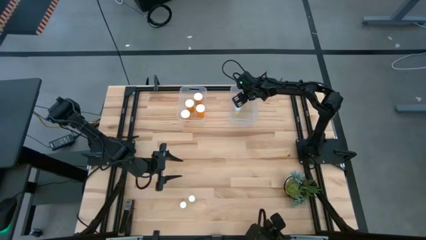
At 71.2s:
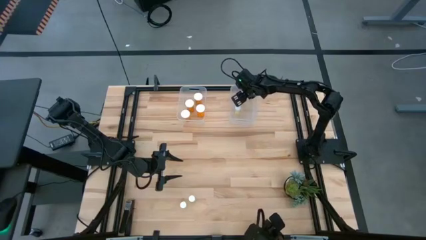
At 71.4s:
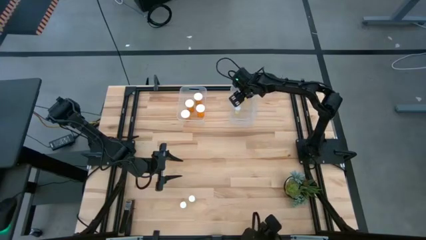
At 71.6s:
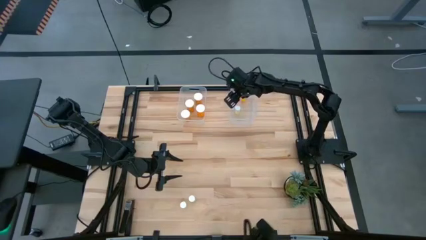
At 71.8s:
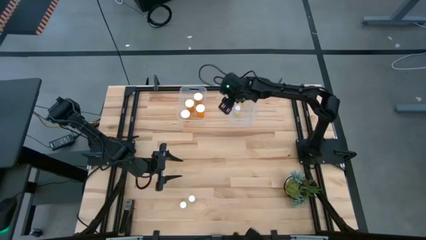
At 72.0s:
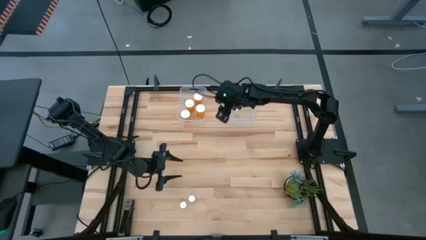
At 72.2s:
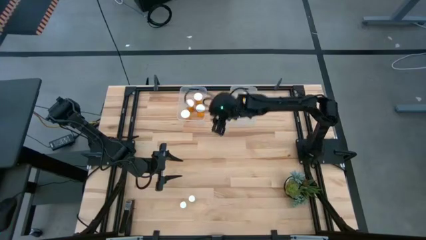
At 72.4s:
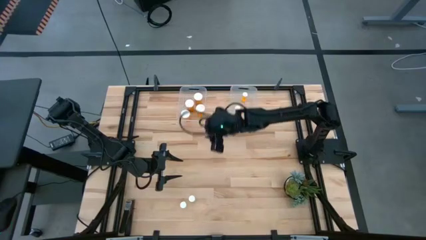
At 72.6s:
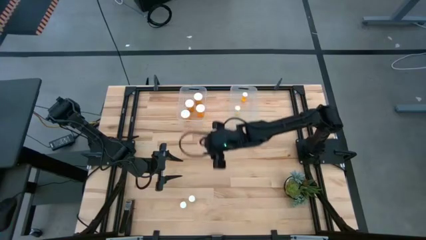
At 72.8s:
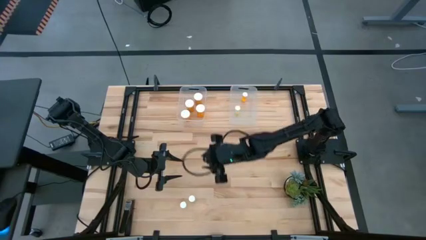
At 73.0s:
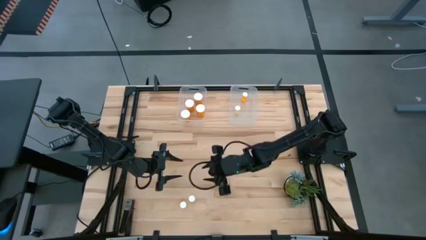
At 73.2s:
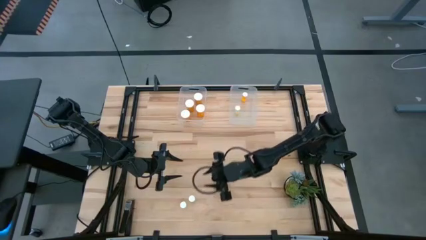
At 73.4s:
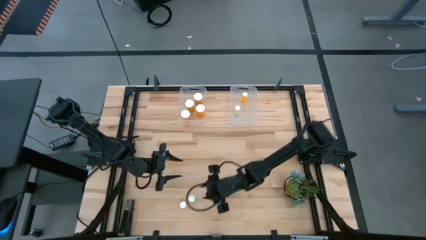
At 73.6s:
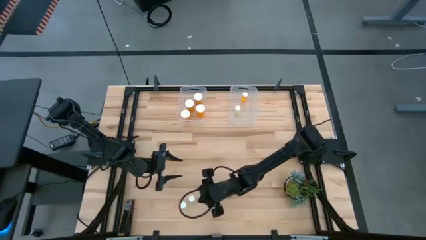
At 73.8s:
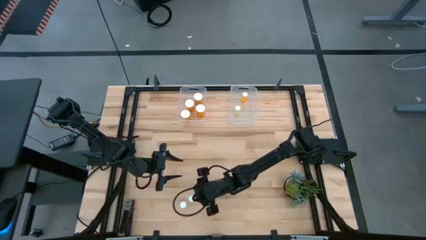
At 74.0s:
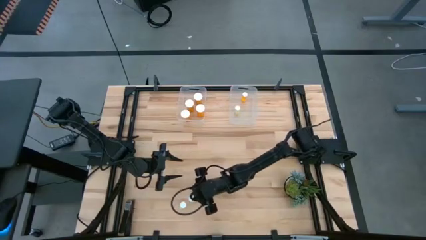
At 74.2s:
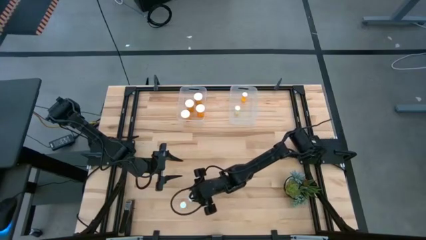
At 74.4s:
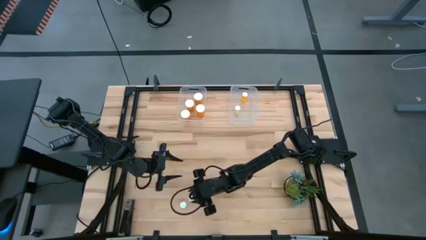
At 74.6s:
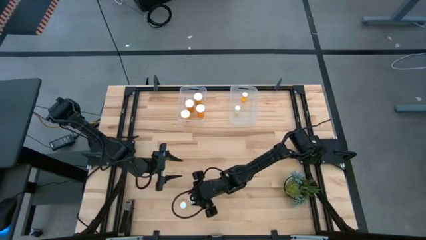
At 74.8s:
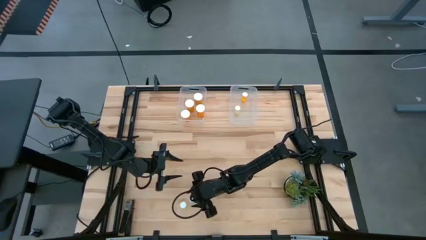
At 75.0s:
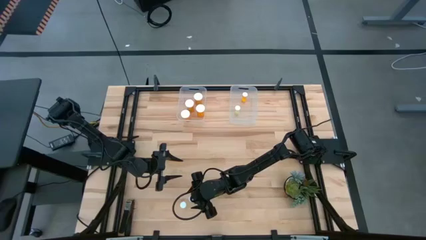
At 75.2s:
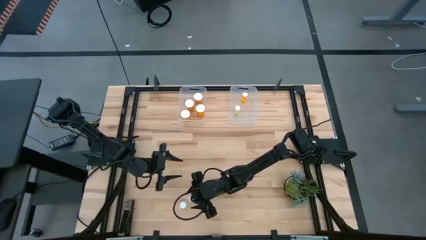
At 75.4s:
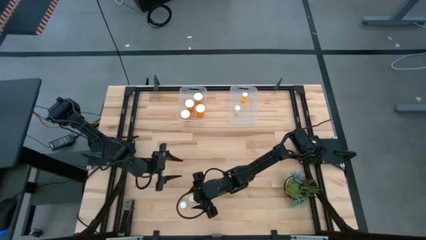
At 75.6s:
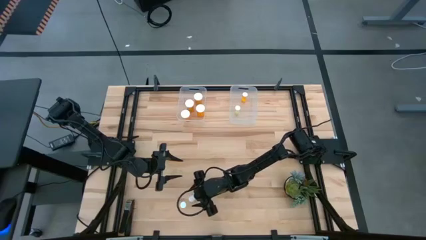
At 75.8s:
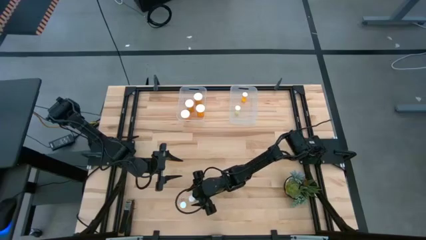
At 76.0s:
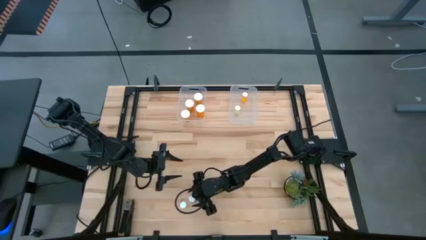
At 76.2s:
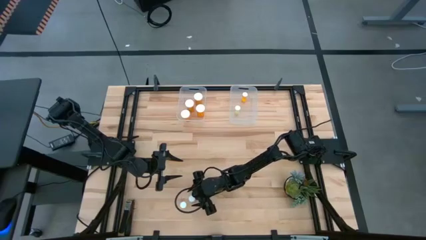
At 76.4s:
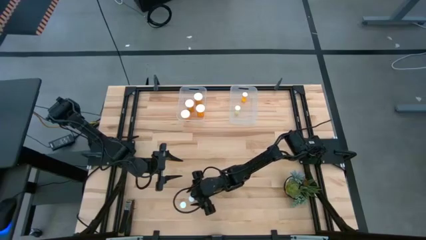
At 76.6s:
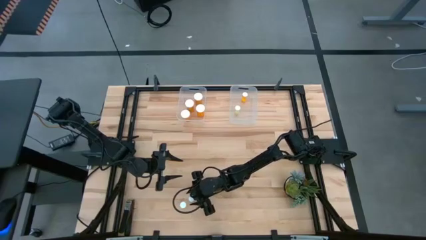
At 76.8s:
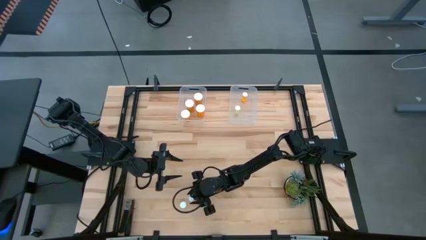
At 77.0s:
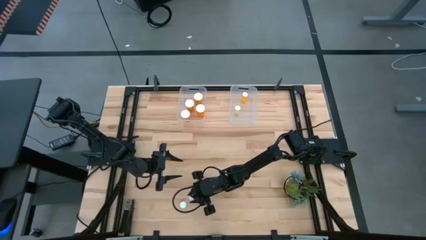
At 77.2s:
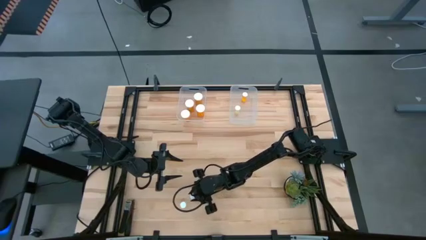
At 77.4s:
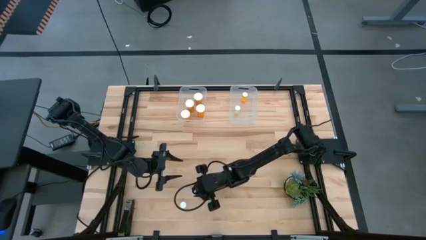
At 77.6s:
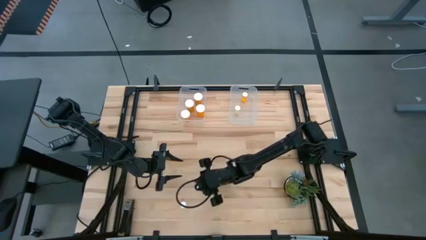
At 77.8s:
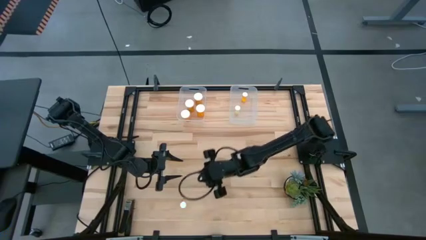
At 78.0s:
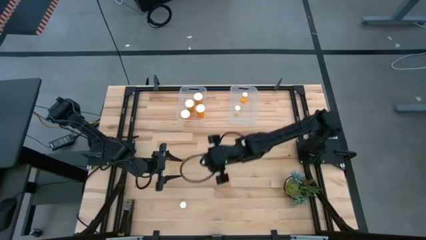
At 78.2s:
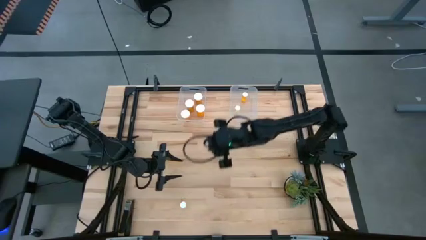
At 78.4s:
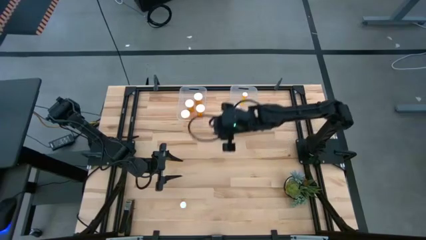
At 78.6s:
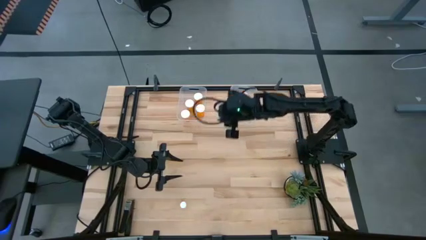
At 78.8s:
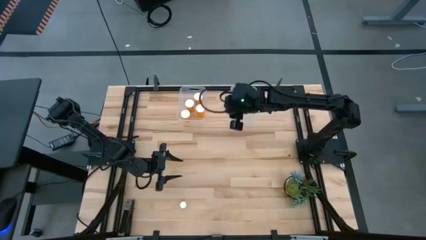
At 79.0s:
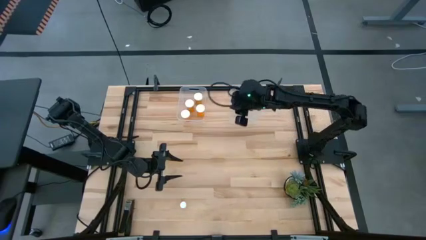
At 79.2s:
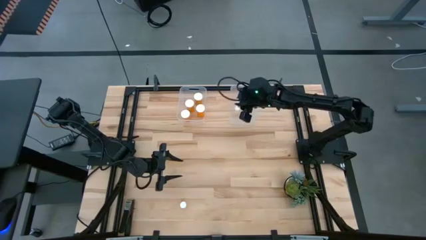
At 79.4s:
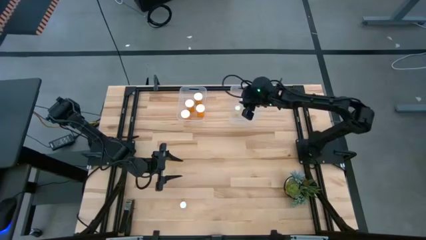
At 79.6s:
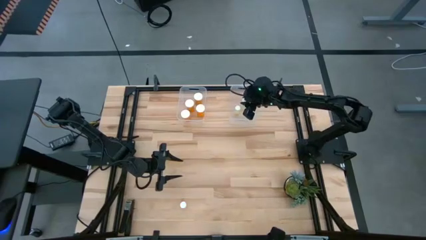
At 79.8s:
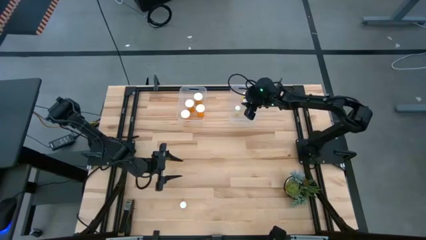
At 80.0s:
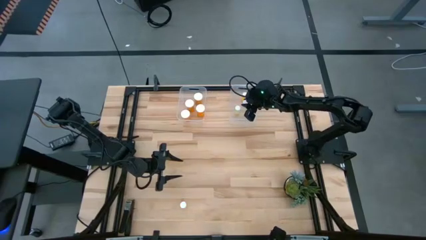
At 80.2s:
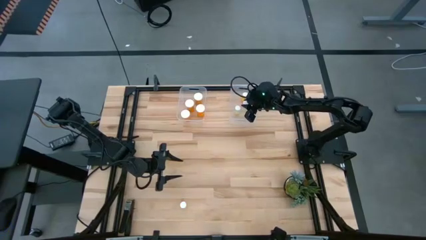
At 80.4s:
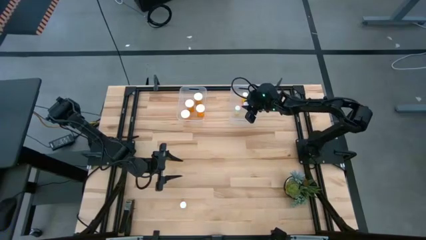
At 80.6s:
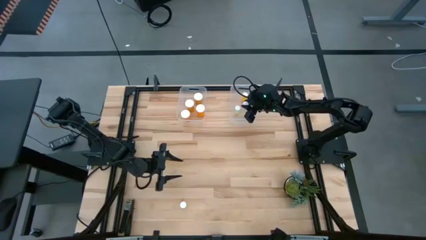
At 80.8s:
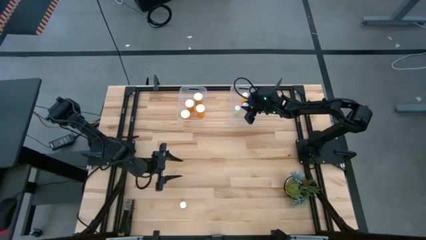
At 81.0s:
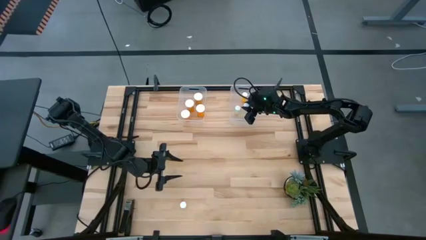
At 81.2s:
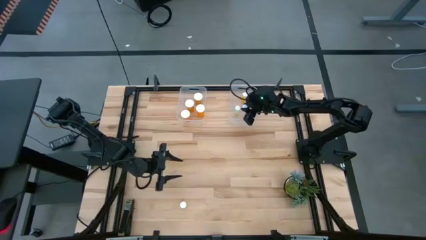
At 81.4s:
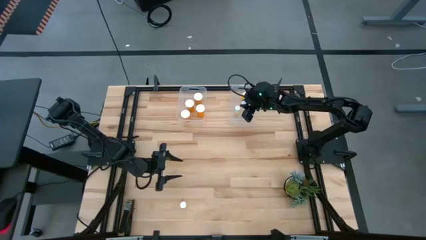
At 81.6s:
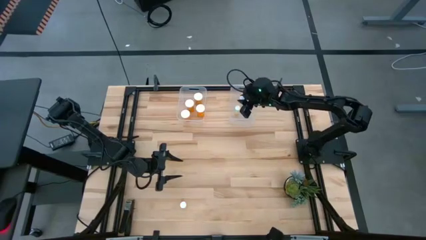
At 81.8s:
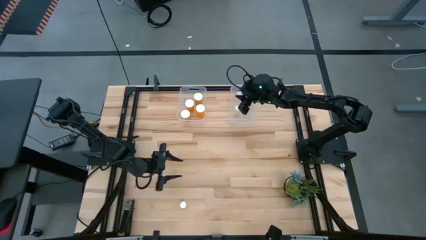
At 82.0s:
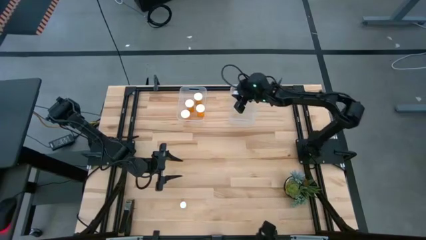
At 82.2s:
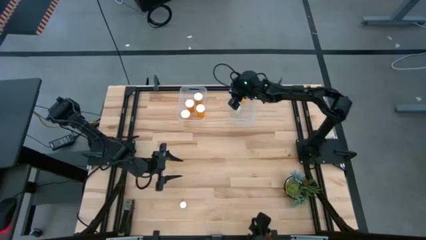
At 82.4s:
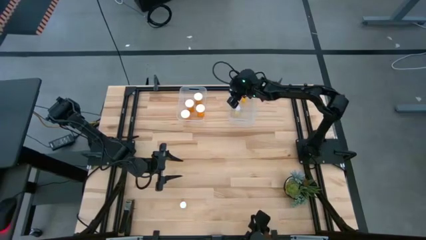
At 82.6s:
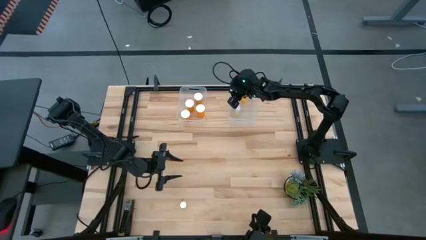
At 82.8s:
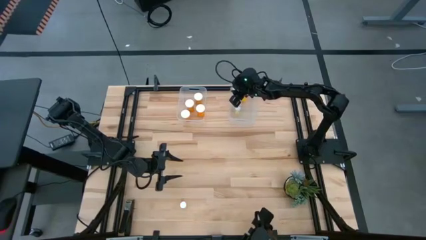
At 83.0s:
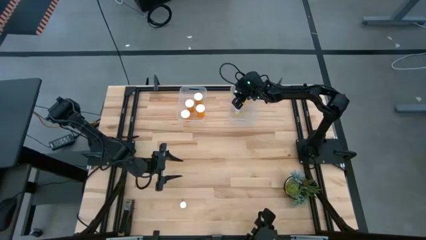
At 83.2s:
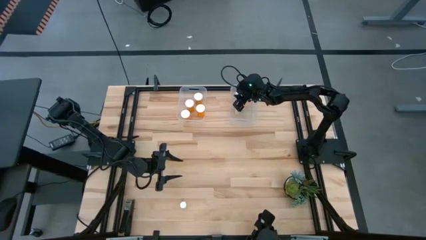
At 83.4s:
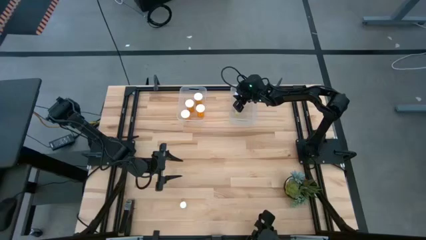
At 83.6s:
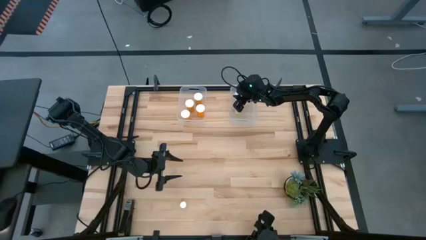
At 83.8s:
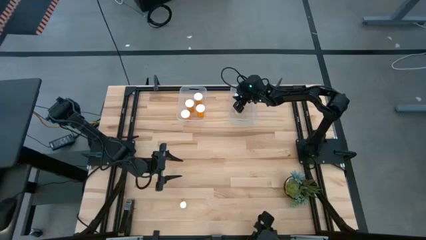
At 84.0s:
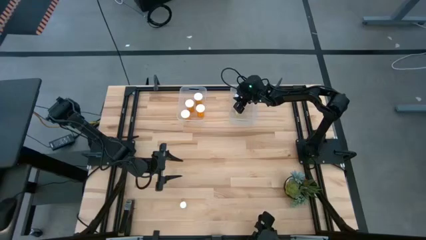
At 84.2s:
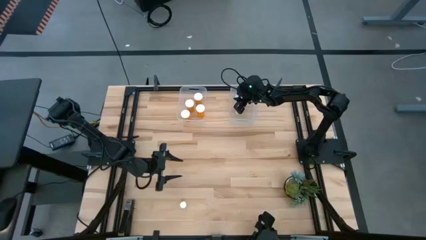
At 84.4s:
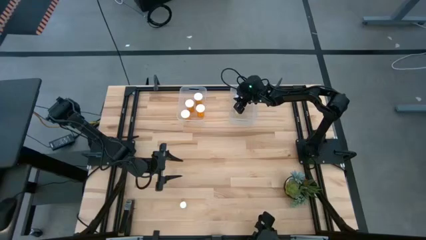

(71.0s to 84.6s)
Task: Pick and place medicine bottles into bin by pill shape (circle, oval)
Put the small yellow pill bottle into the right transparent bin
